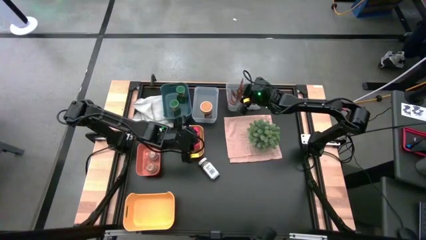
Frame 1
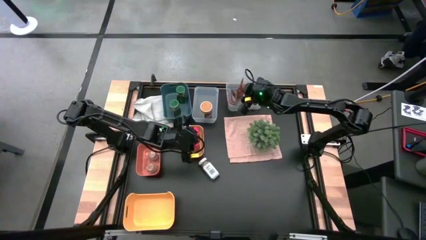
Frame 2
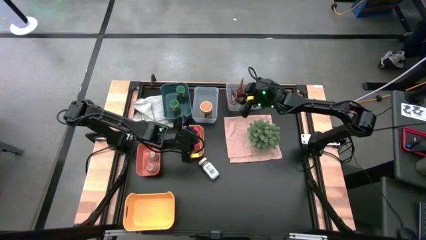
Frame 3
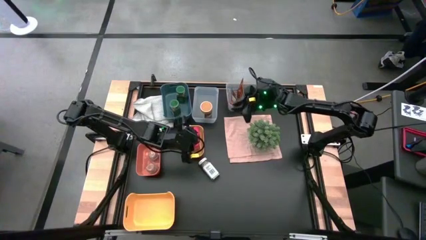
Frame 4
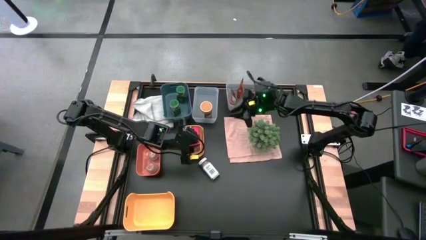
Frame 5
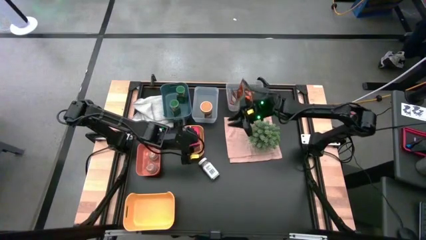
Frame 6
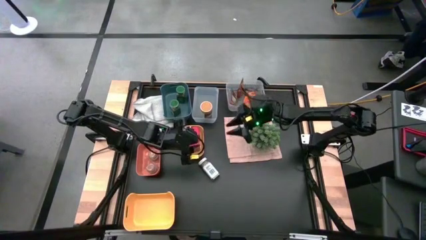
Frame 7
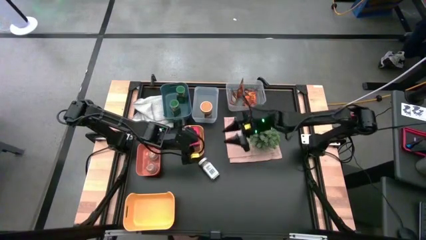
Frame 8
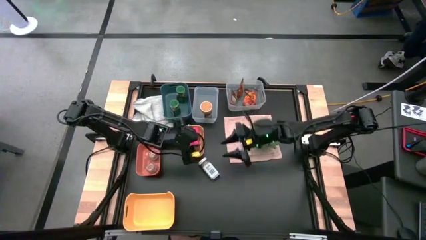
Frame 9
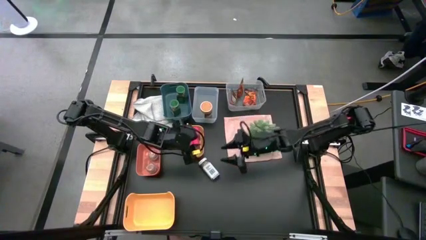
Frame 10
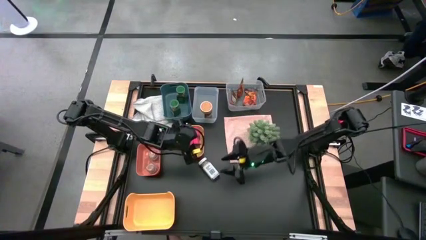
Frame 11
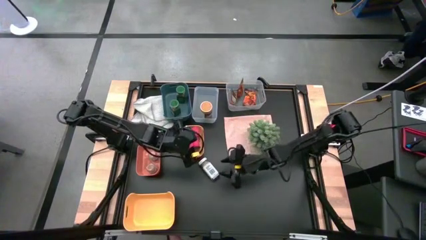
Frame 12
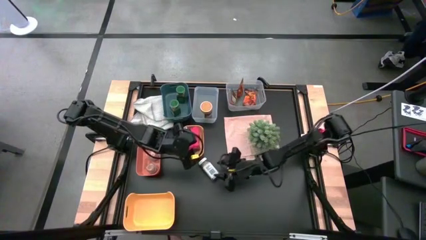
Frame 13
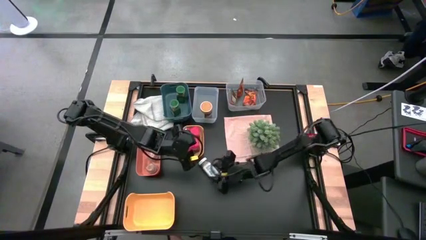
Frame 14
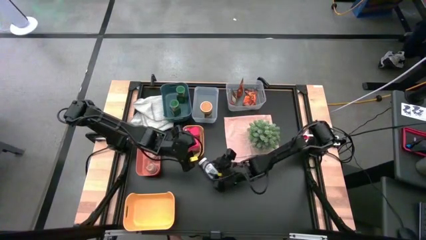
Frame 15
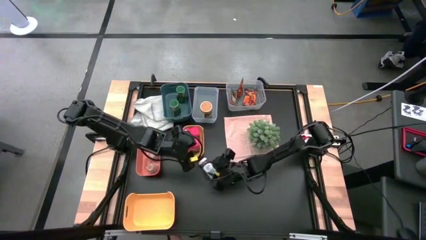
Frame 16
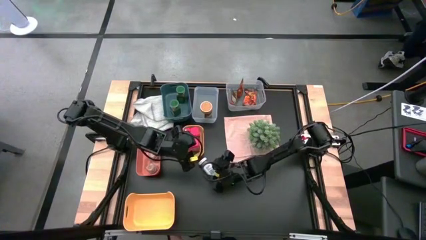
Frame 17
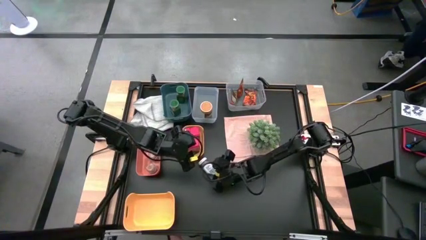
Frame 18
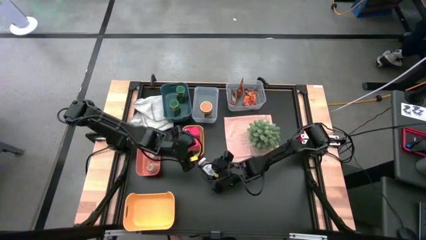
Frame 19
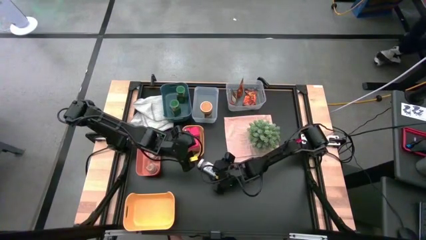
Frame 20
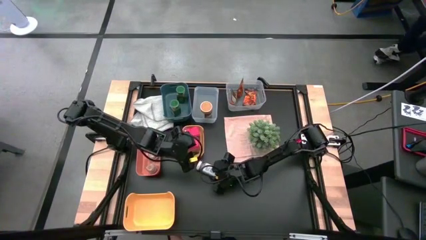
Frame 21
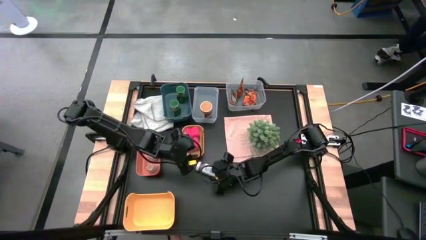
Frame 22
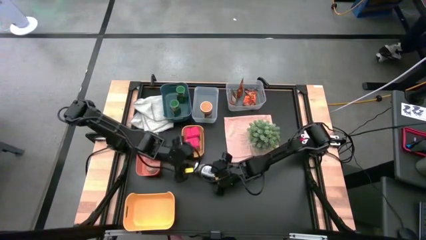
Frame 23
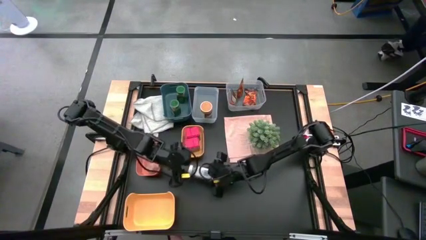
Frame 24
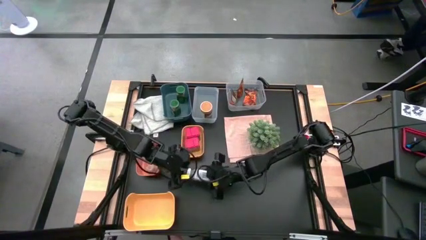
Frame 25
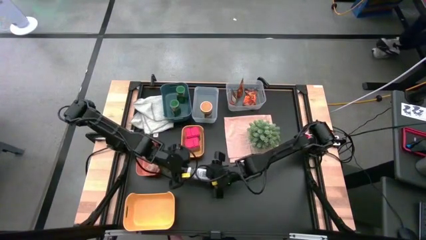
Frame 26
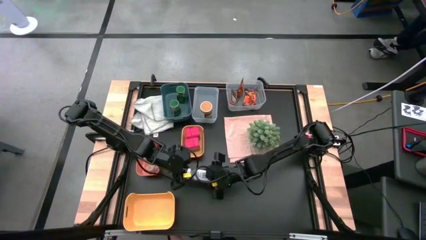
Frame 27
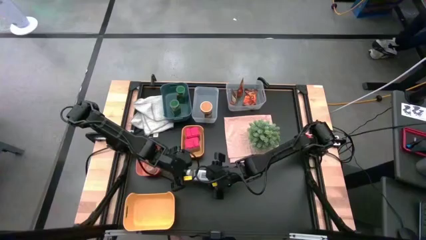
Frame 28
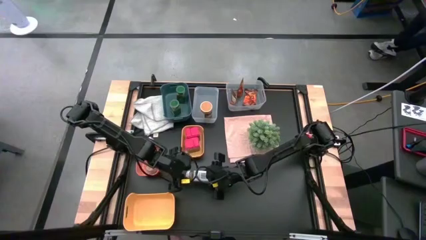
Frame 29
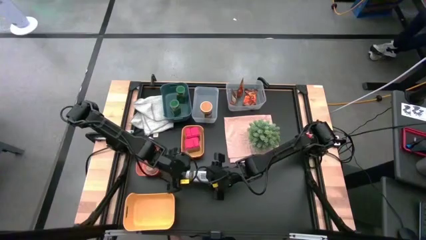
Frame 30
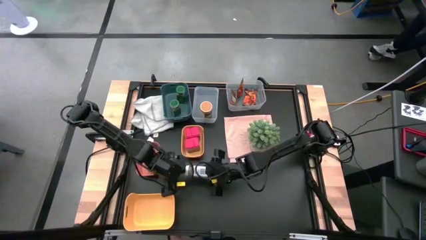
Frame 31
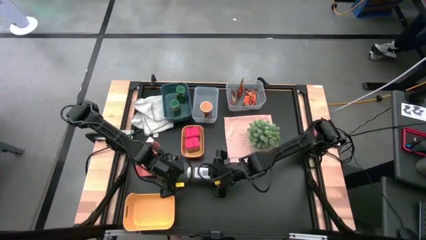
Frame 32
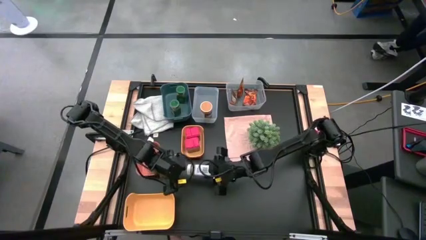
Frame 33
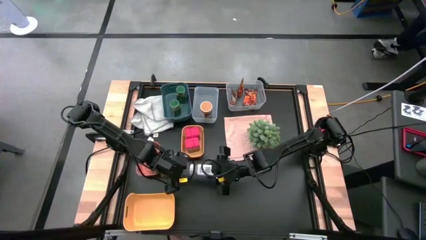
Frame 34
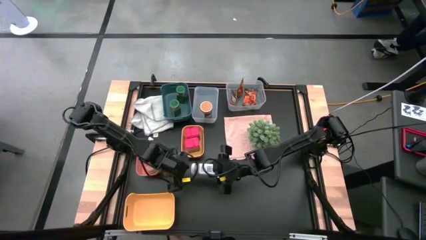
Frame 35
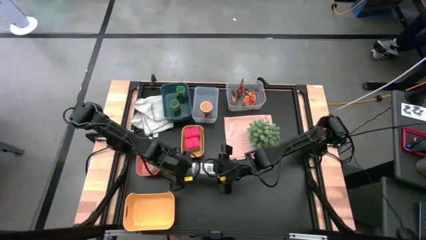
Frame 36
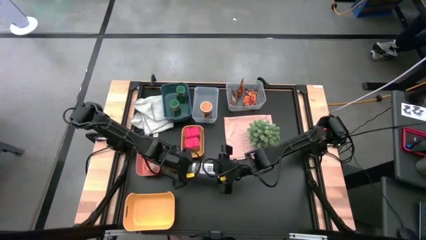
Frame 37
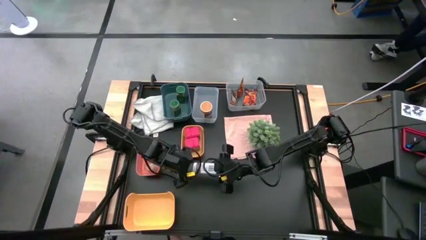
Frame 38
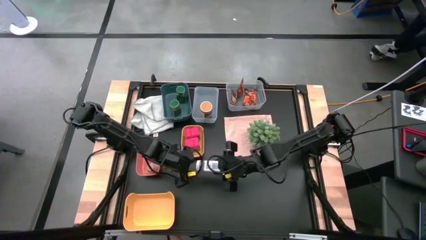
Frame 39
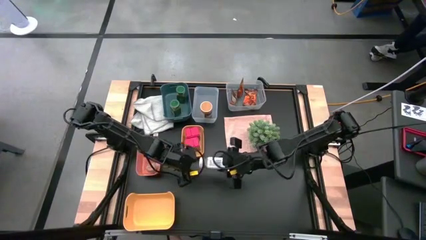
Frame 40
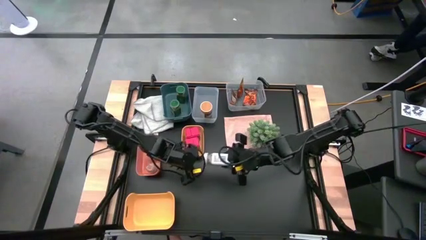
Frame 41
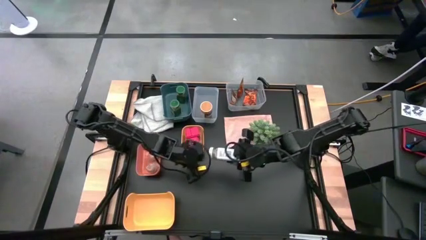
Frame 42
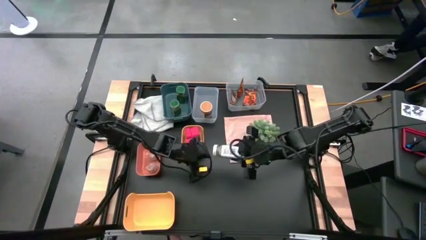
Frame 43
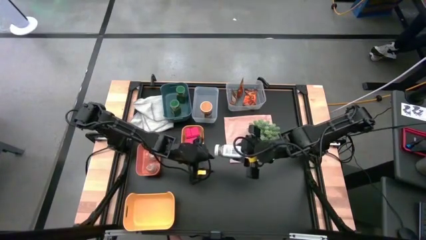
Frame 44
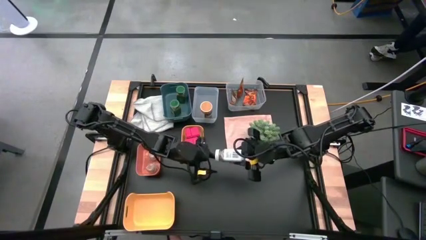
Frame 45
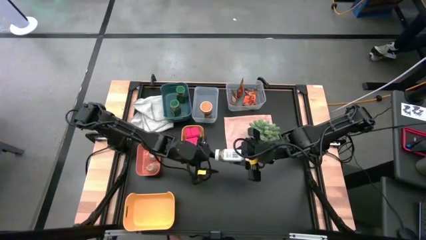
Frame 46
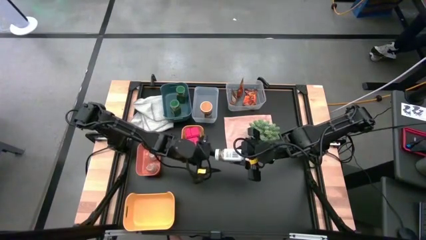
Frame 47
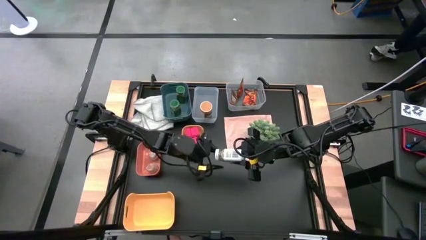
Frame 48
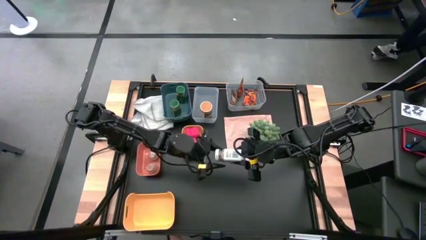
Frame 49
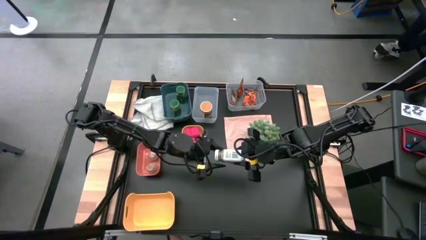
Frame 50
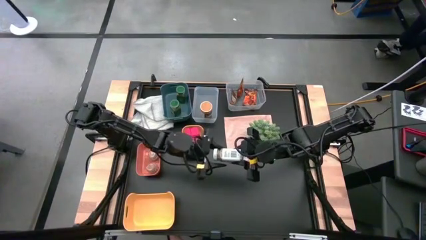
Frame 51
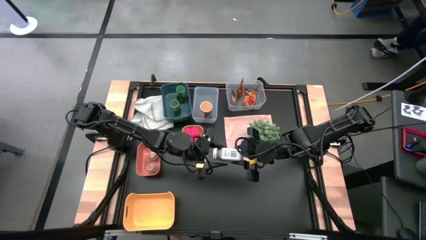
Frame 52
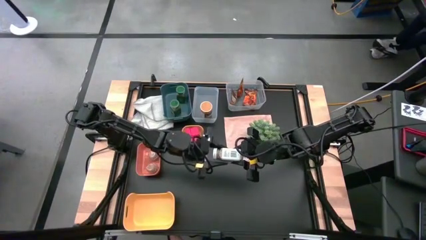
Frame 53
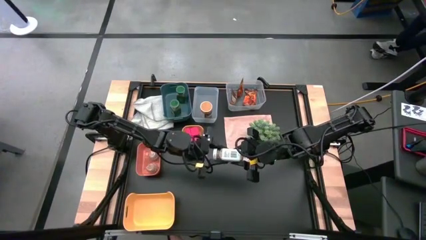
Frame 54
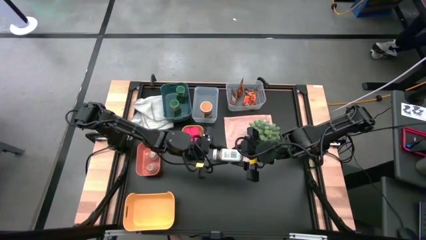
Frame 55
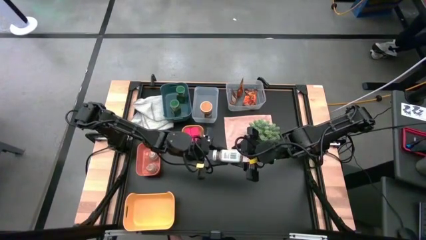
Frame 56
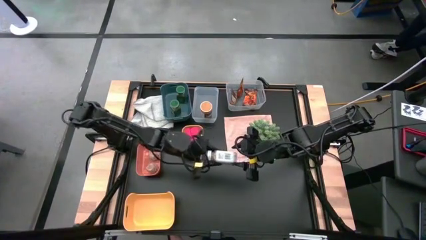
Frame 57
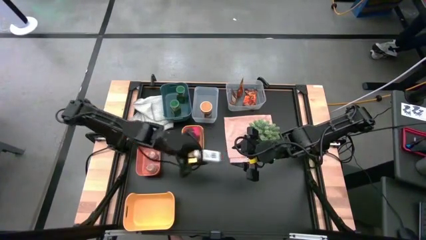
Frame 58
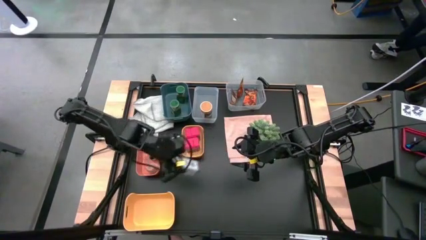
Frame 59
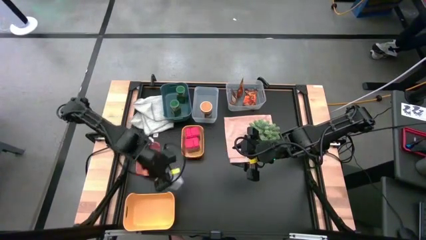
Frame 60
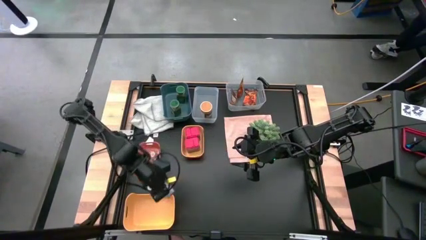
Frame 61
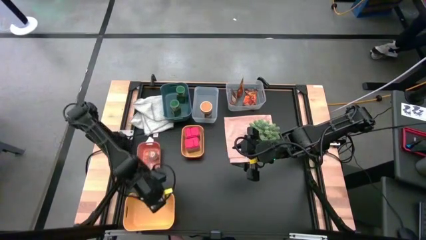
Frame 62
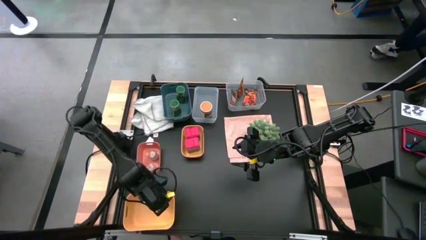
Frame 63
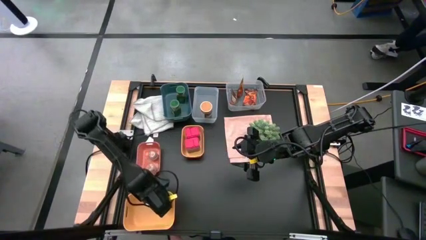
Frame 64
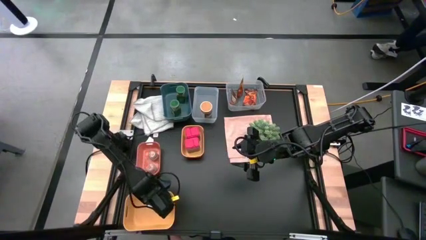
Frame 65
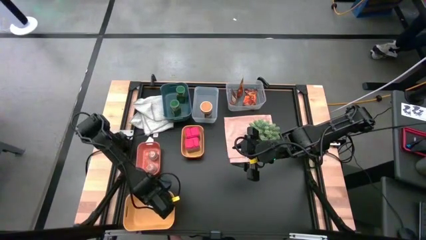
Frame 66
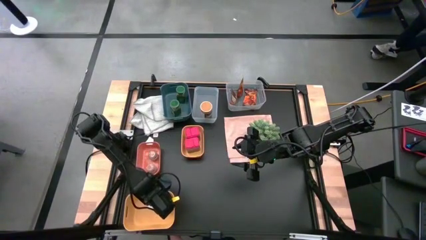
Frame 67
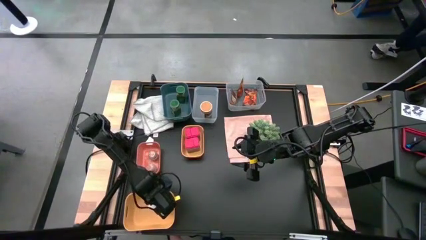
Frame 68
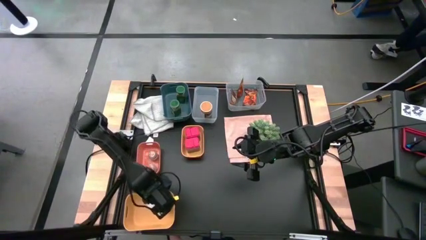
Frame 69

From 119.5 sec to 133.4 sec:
Task: Sort spices by type
Put the white seasoning bottle into the bottom yellow bin

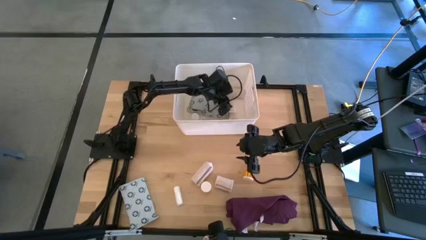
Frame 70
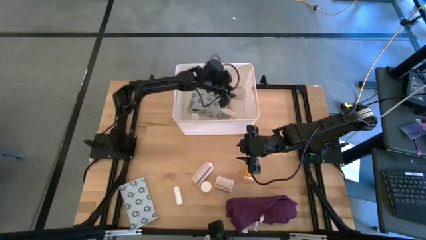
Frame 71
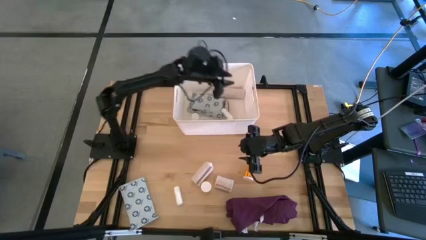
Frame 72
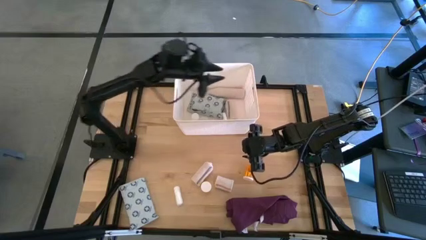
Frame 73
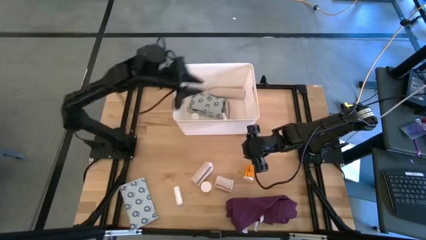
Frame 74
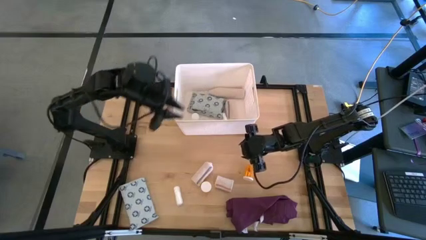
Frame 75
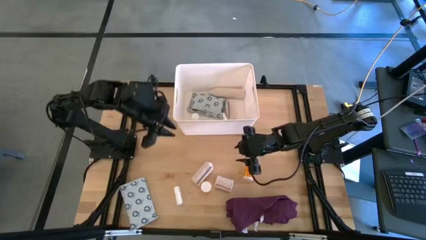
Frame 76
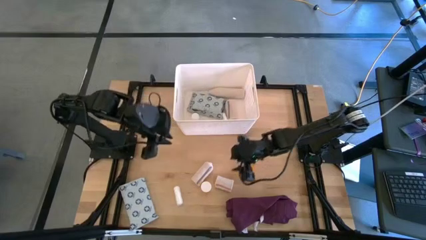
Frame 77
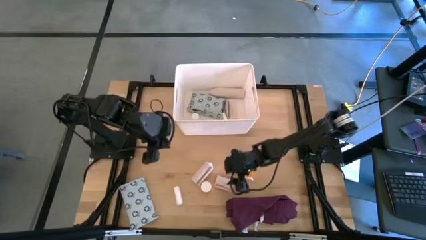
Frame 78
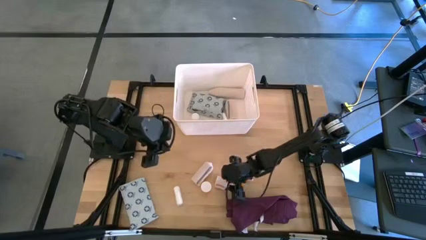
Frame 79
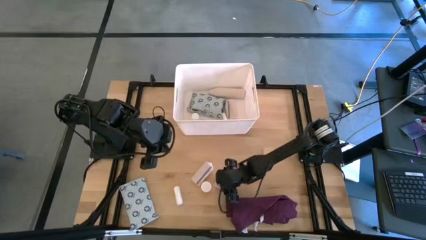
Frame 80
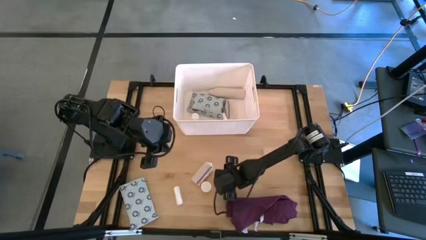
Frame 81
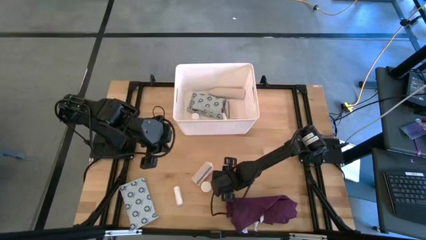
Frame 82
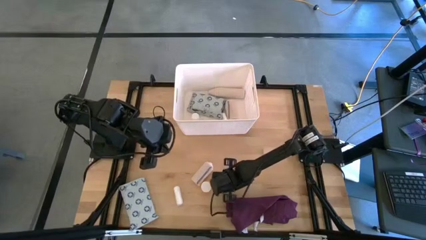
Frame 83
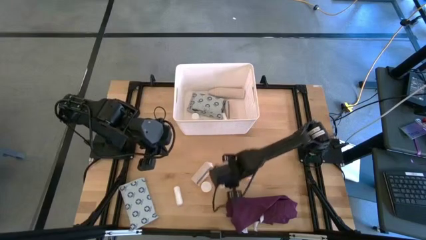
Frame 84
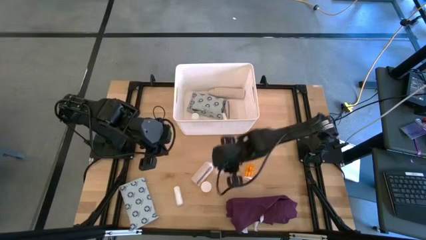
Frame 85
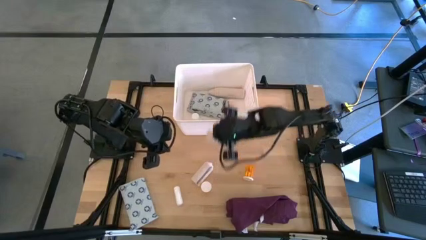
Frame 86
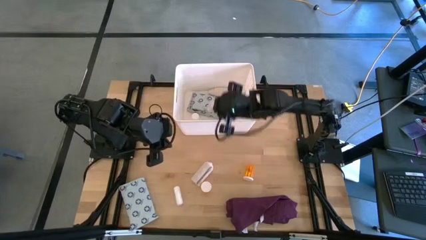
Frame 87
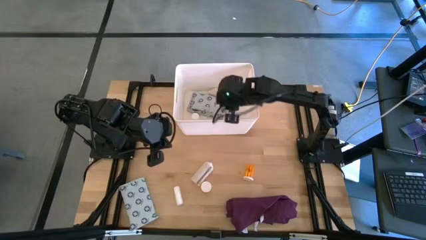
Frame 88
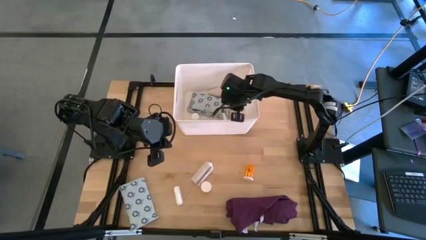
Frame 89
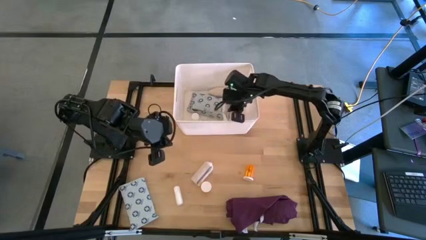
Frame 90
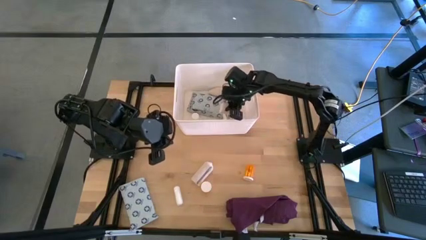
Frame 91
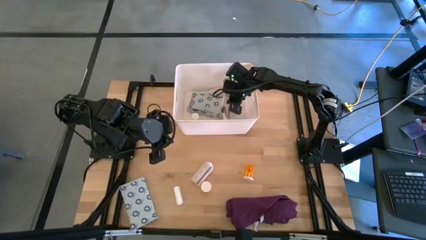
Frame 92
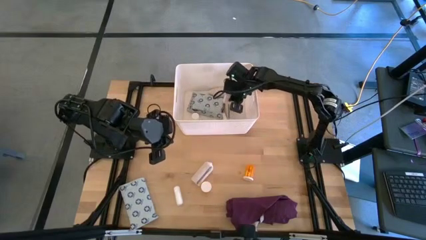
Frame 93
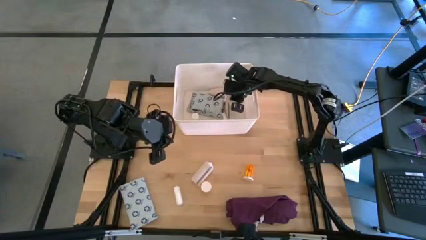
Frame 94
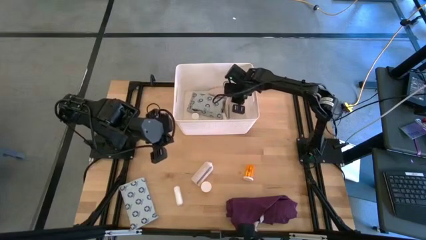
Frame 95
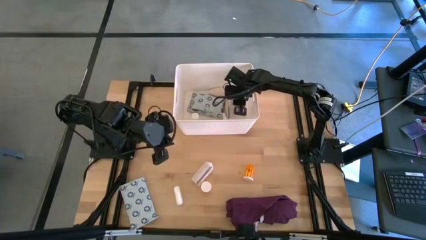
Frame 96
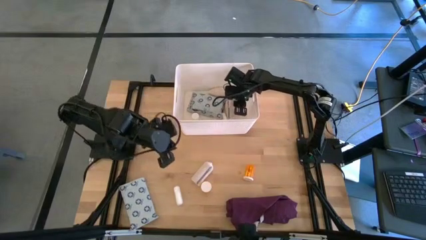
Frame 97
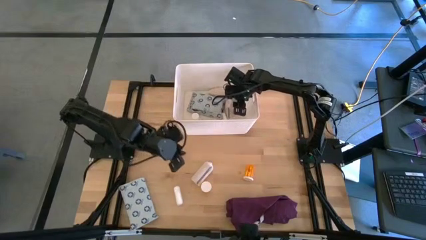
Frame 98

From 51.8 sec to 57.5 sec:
Task: Pick & place medical supplies in basket/bin
Put the light brown and red bandage into the white bin
